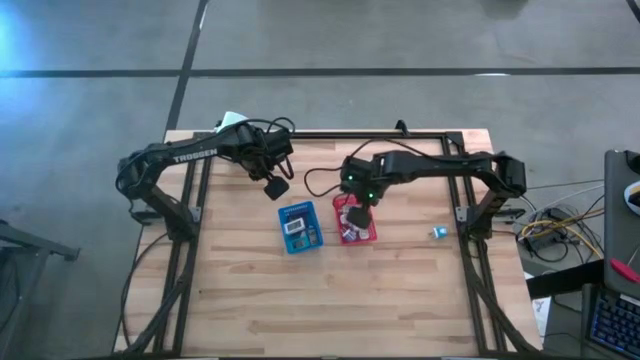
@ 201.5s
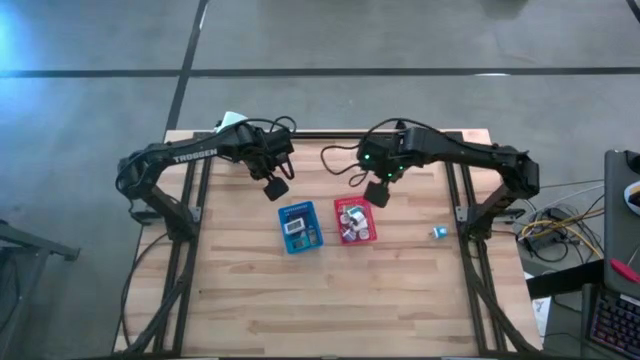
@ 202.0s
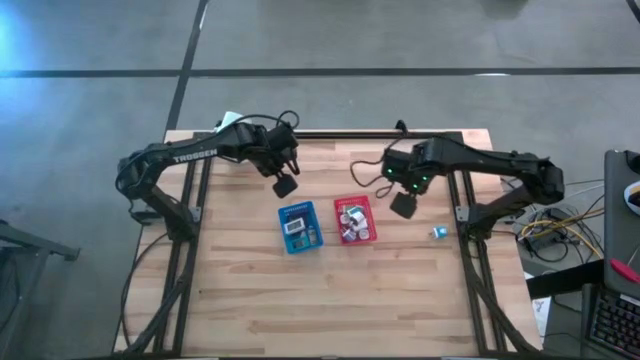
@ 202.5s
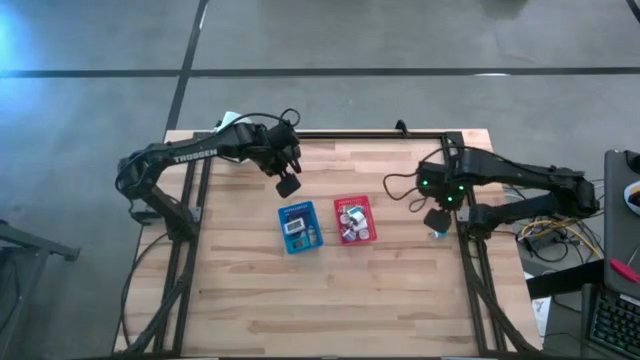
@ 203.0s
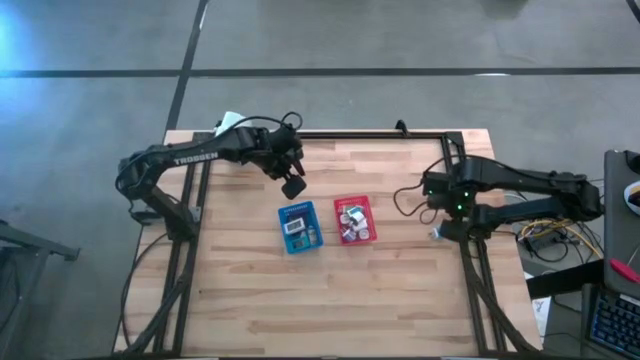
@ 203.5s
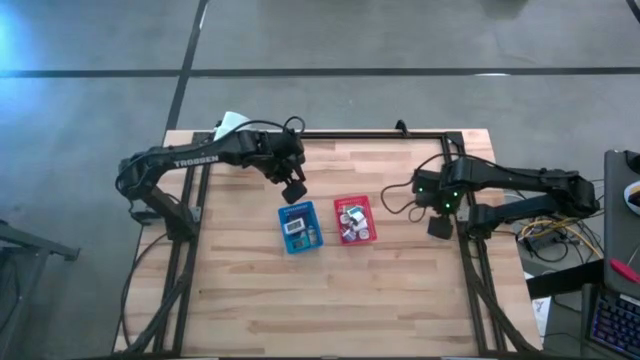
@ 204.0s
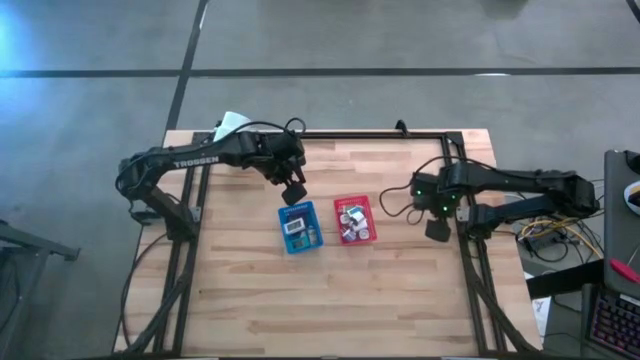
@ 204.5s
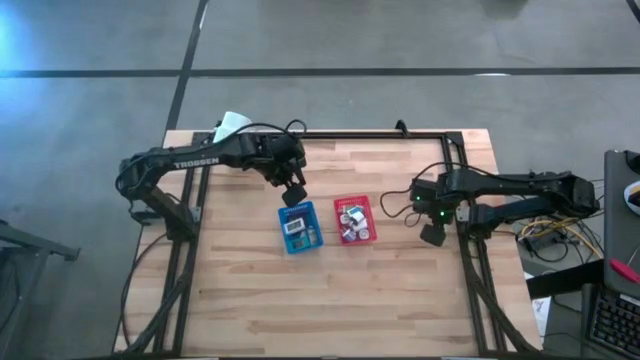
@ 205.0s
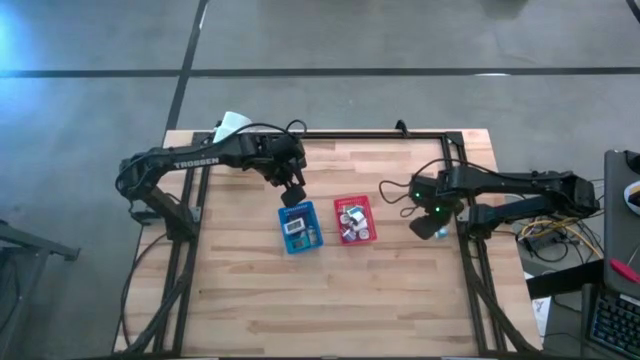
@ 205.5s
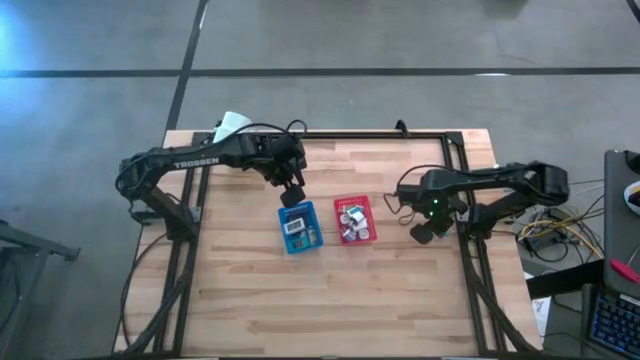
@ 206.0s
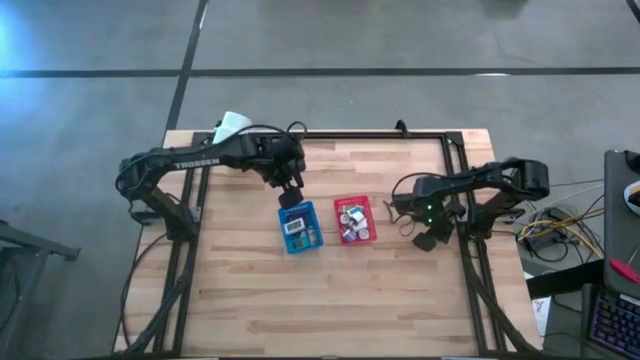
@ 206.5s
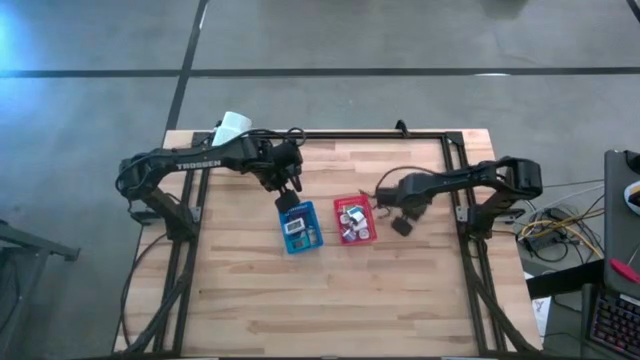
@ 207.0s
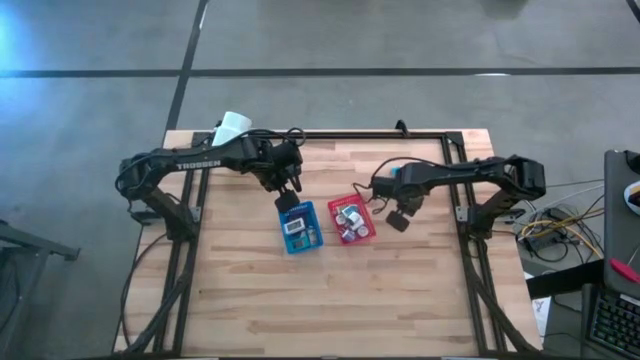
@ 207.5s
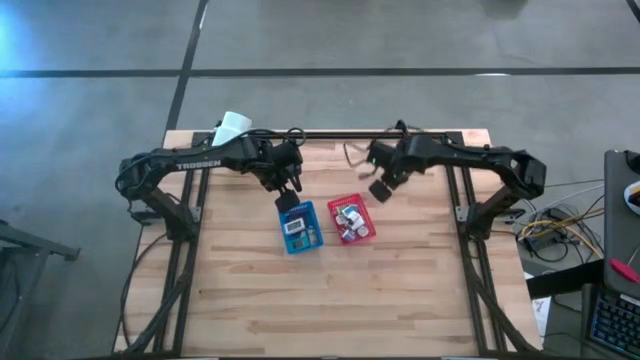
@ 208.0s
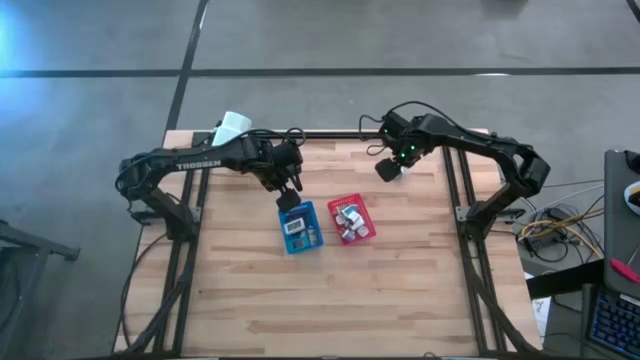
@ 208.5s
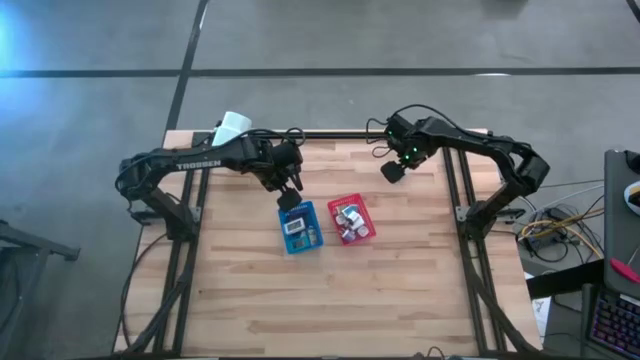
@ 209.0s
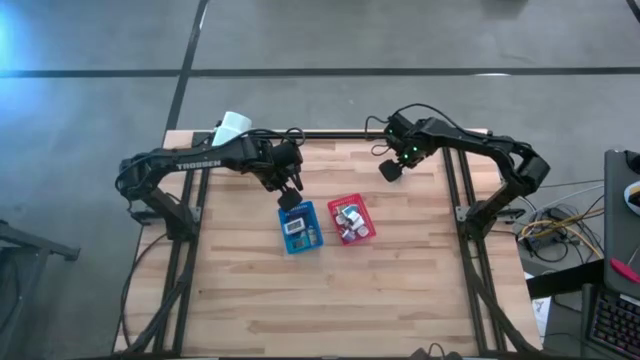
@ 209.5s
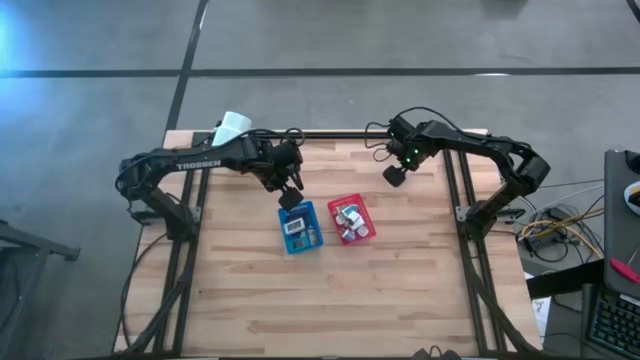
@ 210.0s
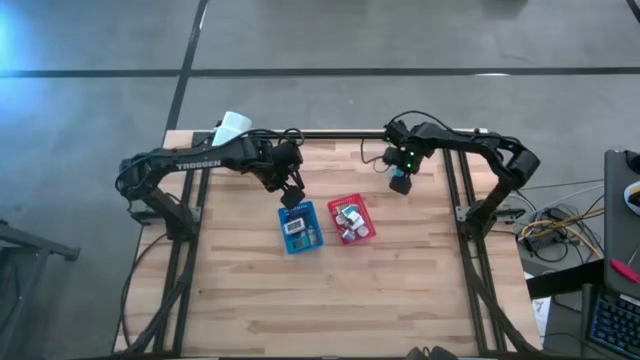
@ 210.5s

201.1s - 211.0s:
Task: Pick & Place Office items
Put the blue charger adapter into the red bin

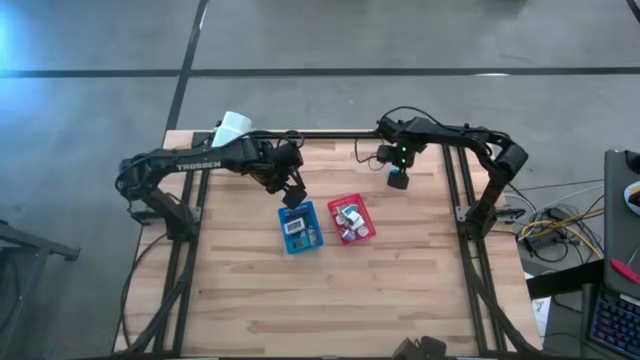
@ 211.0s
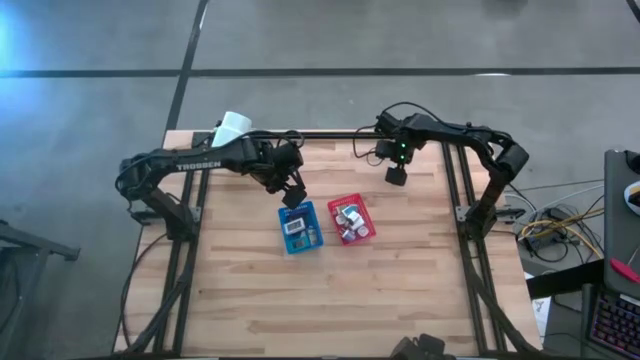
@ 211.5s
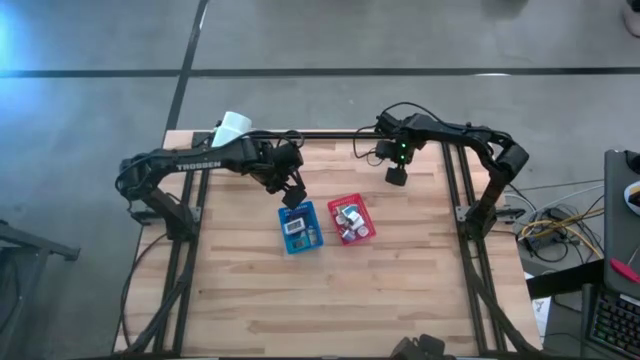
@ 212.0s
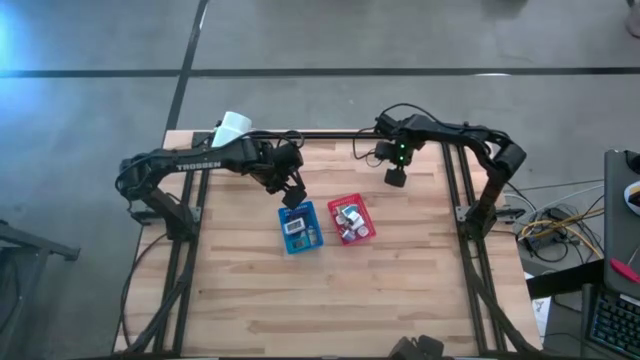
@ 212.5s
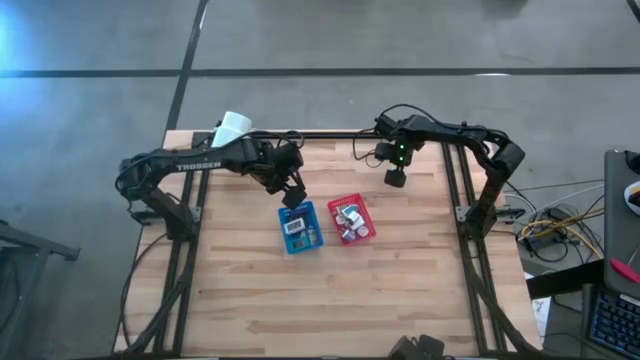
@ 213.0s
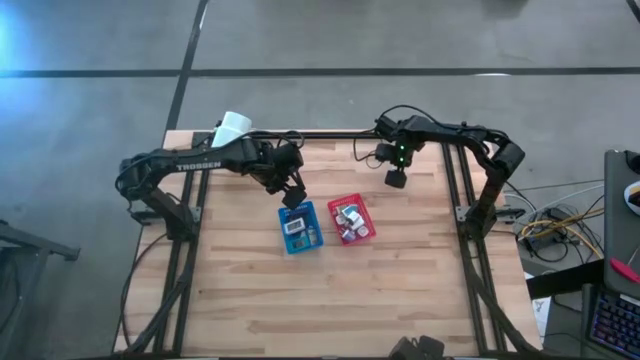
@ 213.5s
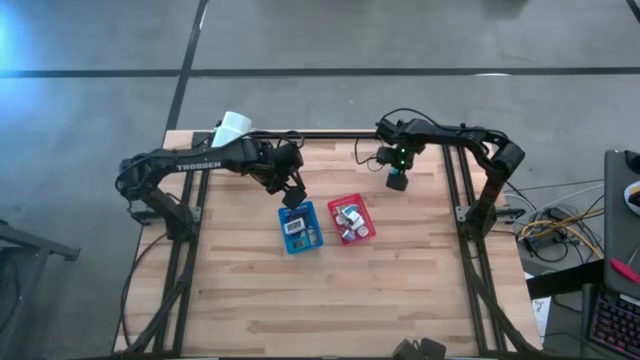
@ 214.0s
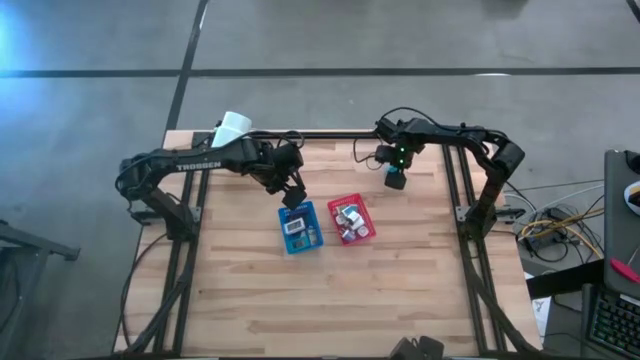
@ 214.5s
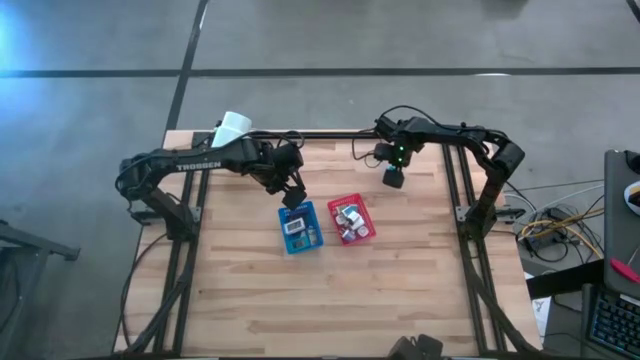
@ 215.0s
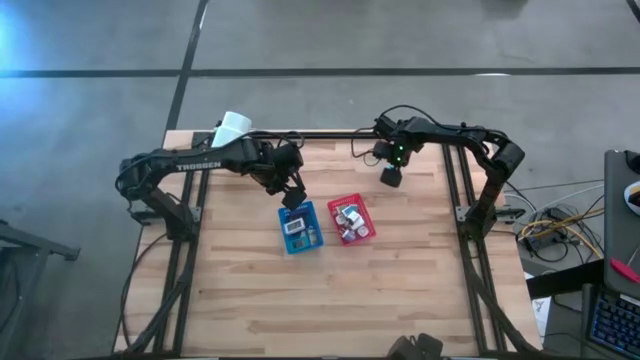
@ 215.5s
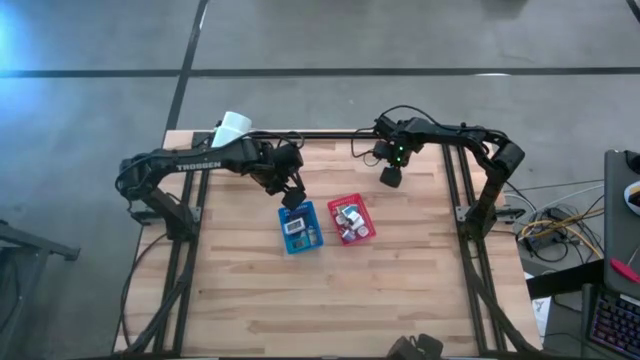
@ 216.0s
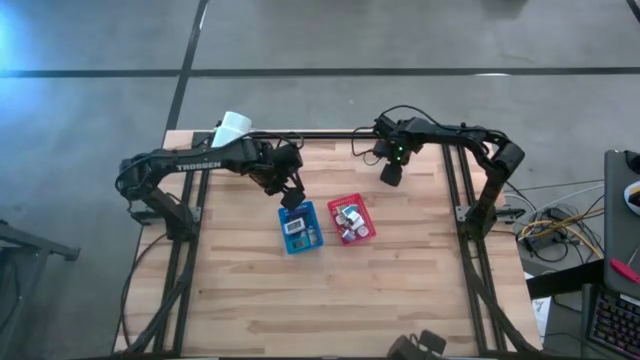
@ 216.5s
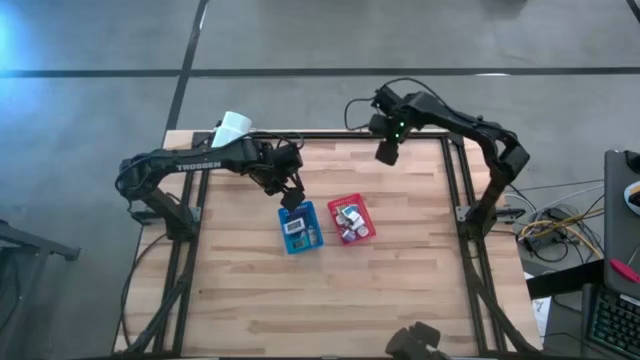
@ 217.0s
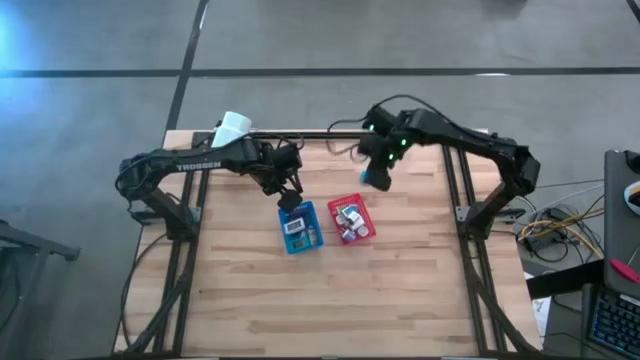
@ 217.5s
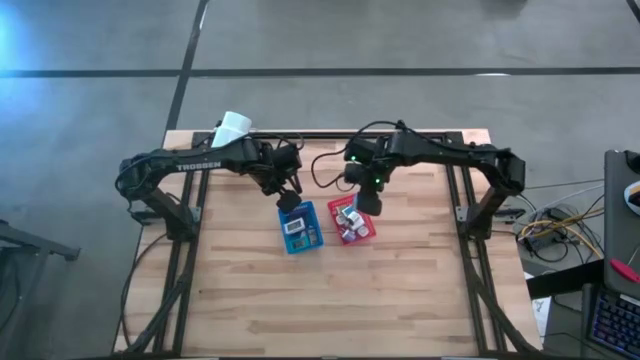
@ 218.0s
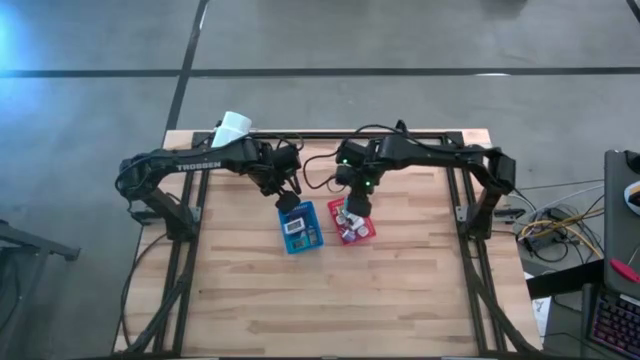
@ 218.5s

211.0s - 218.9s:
Put the blue charger adapter into the red bin

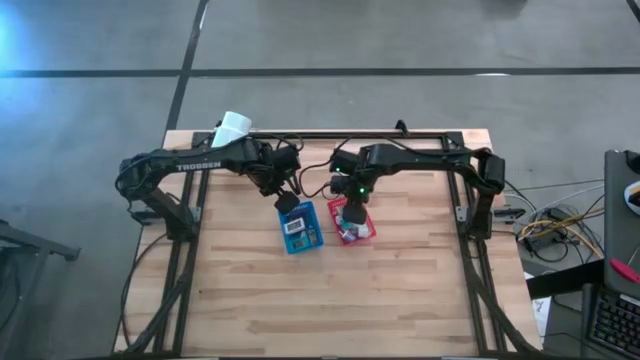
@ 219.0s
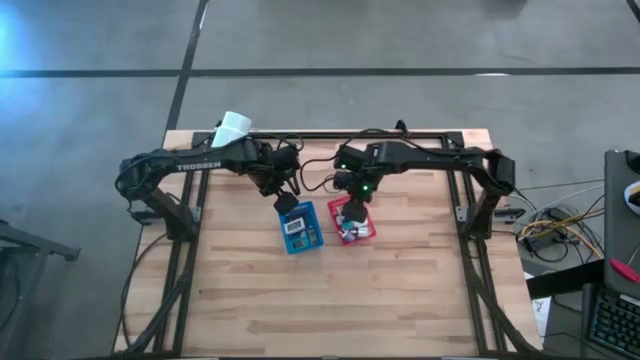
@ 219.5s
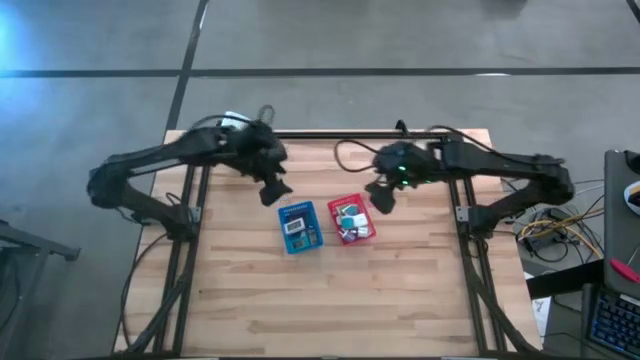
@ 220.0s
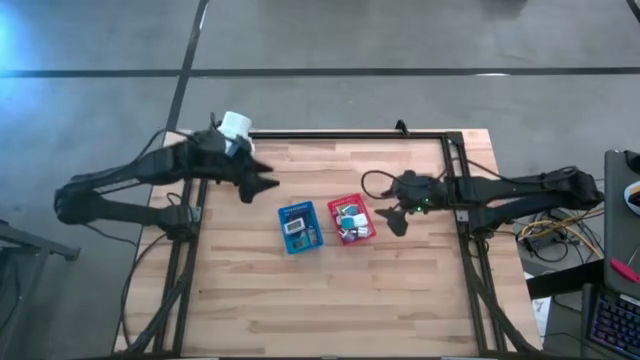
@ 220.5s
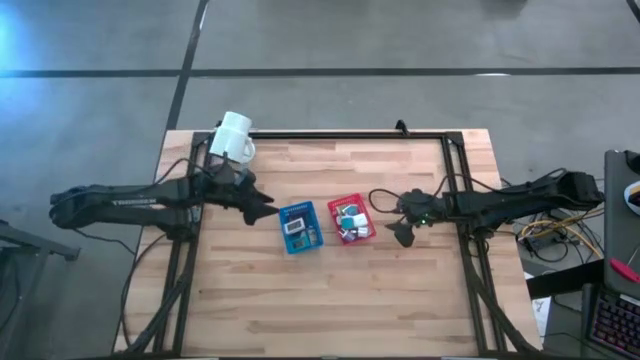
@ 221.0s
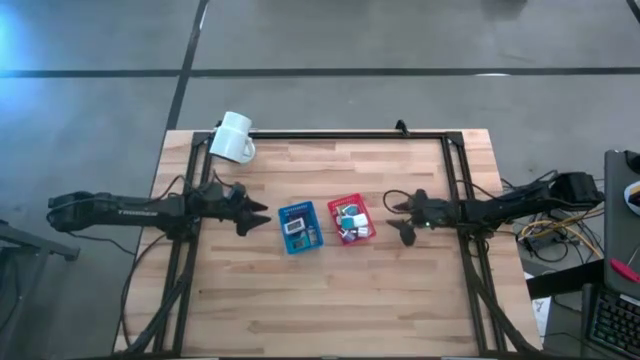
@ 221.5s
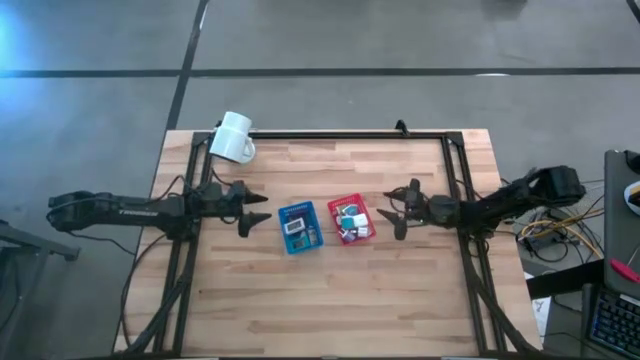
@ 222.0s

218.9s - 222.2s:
Return to Home Position

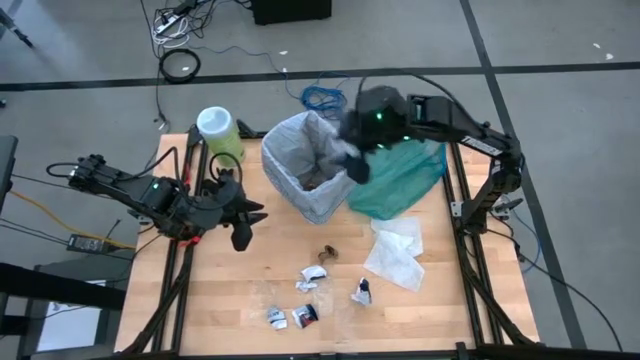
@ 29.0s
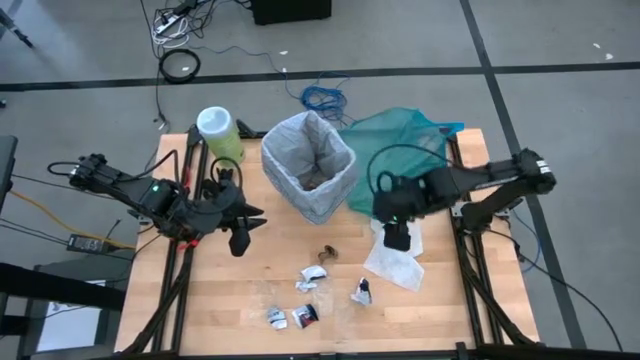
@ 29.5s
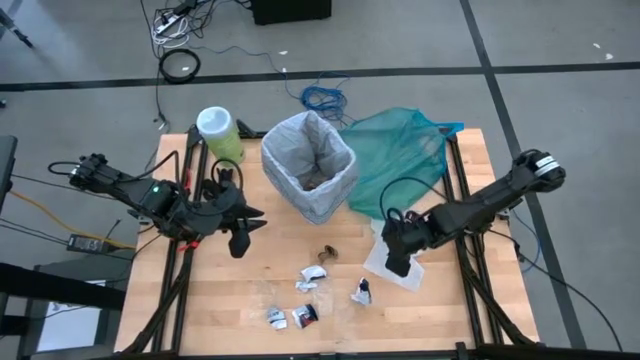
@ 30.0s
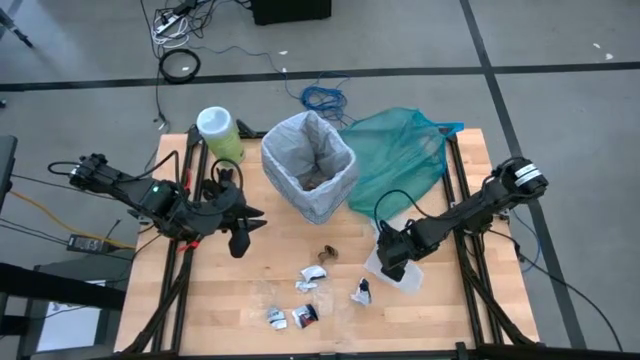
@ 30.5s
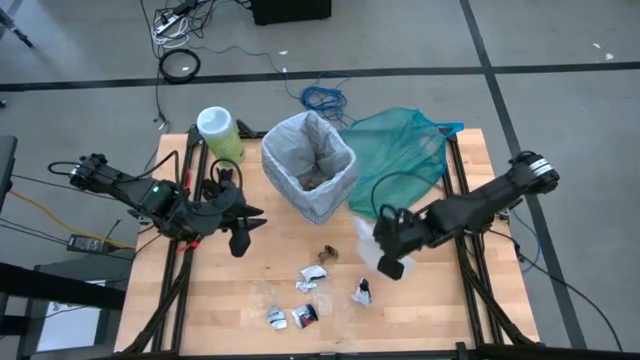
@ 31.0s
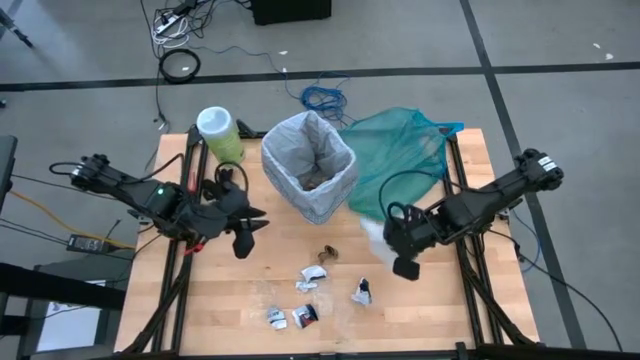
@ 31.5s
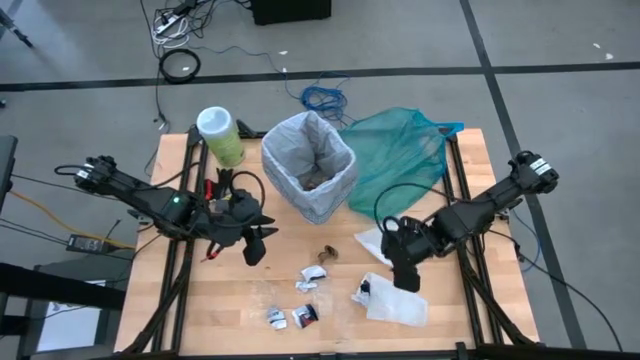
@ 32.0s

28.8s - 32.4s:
Task: place trash/remove bag and relplace
Put the white tissue paper into the trash bin
